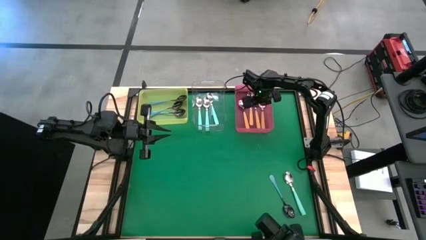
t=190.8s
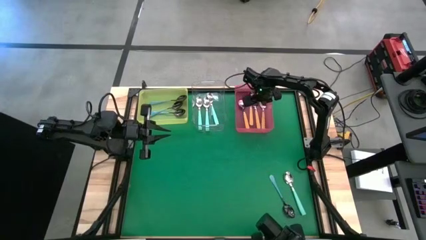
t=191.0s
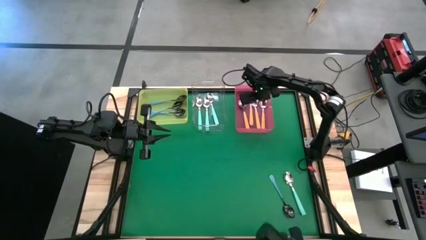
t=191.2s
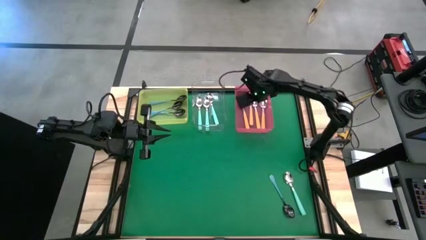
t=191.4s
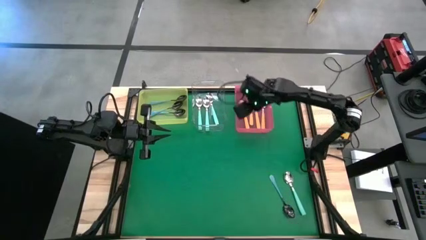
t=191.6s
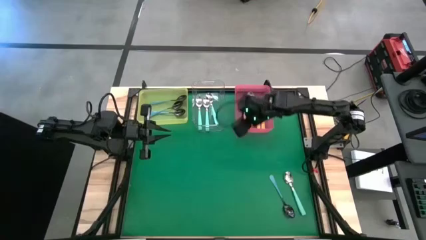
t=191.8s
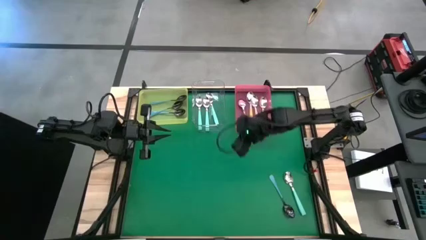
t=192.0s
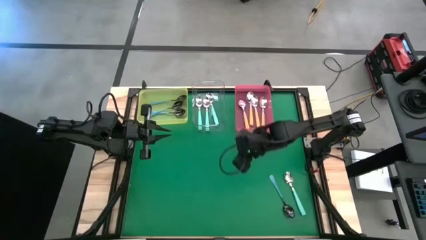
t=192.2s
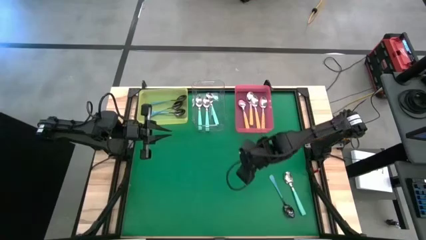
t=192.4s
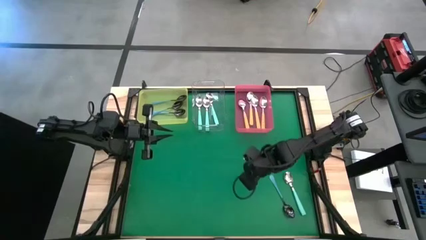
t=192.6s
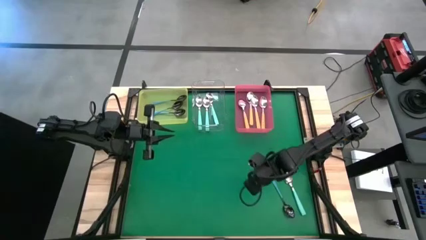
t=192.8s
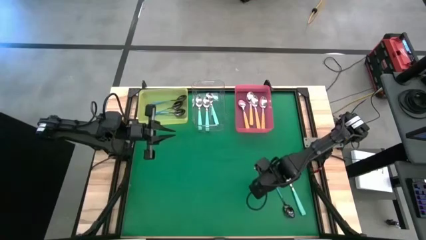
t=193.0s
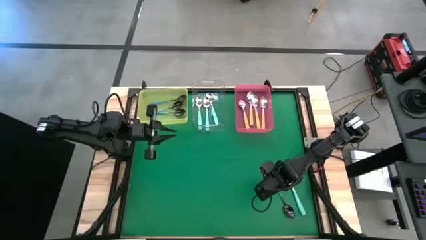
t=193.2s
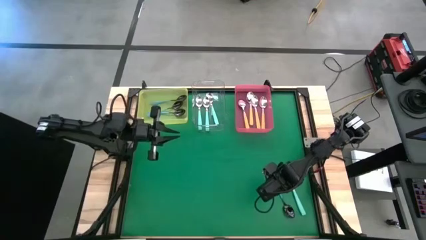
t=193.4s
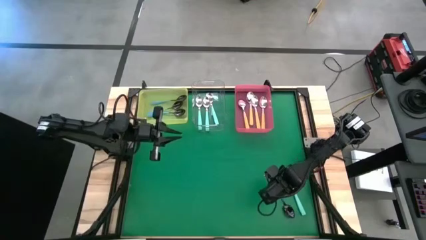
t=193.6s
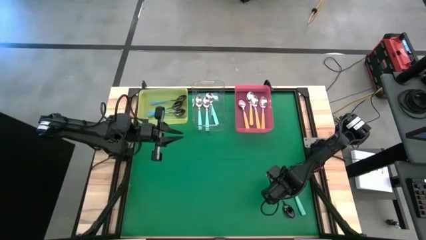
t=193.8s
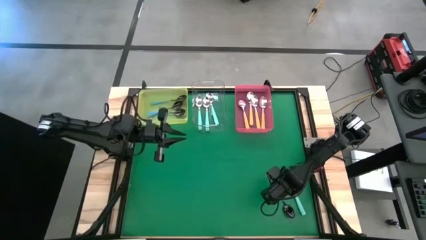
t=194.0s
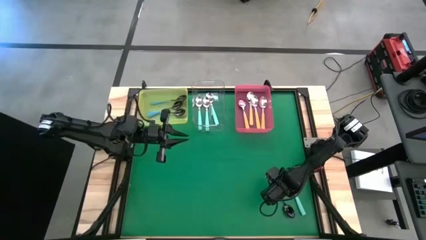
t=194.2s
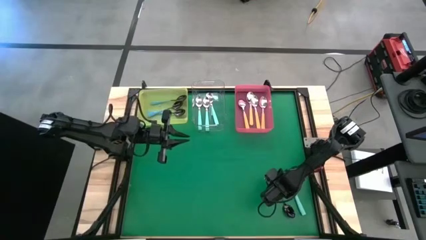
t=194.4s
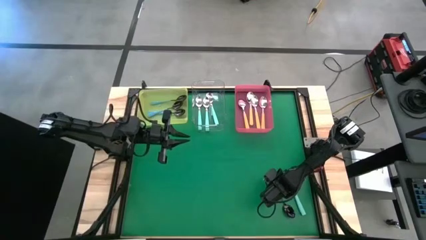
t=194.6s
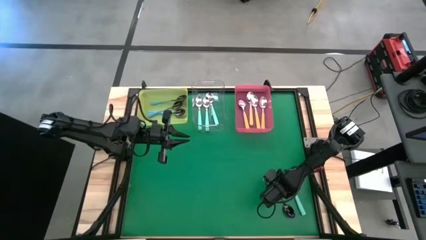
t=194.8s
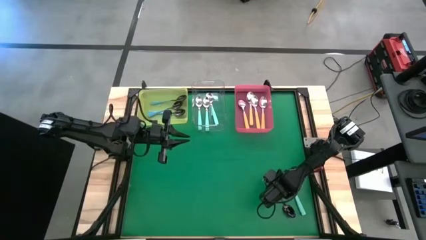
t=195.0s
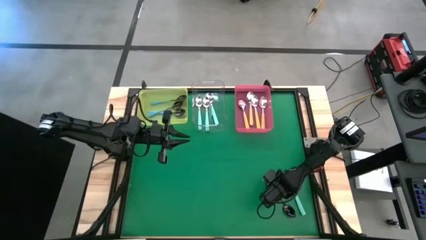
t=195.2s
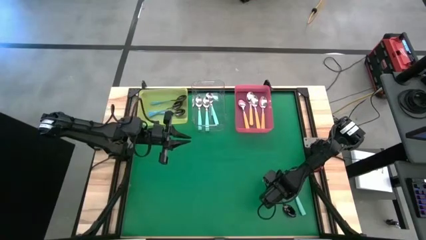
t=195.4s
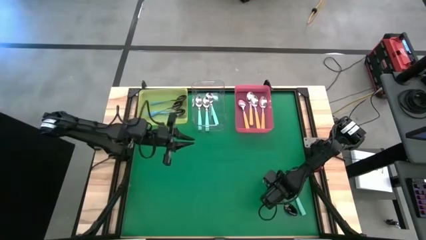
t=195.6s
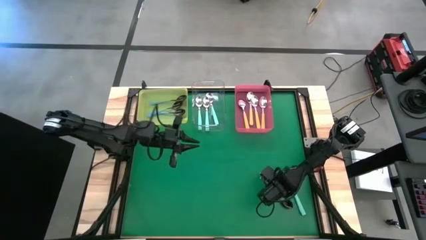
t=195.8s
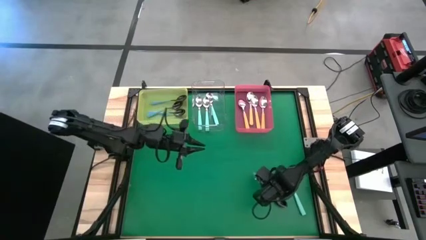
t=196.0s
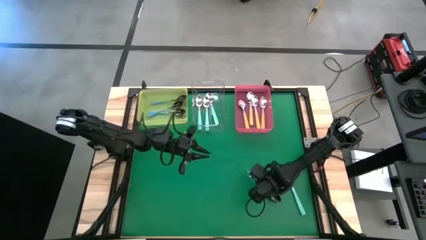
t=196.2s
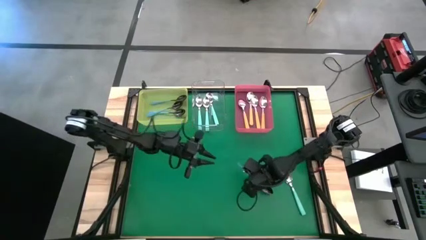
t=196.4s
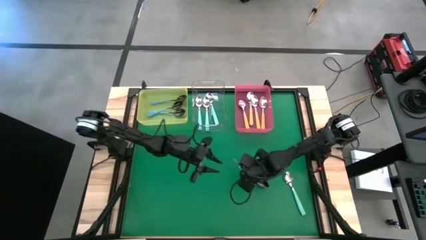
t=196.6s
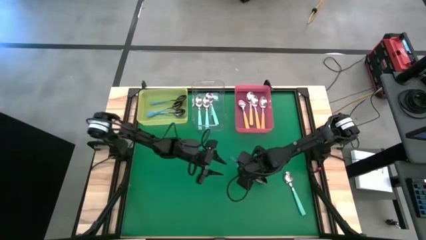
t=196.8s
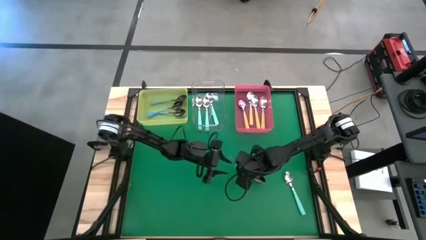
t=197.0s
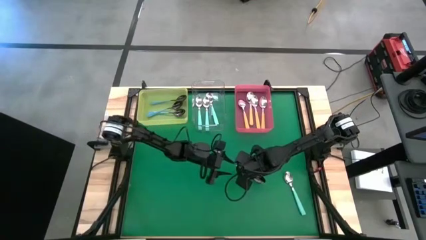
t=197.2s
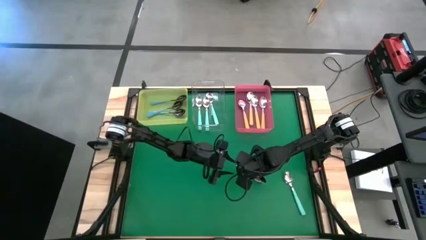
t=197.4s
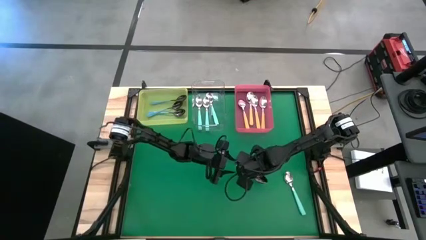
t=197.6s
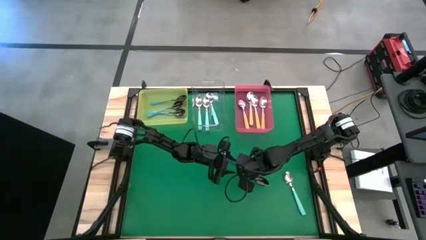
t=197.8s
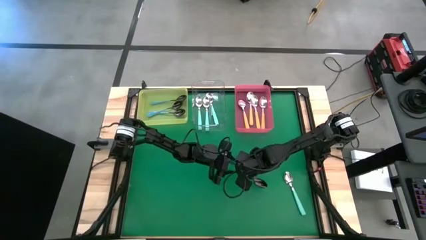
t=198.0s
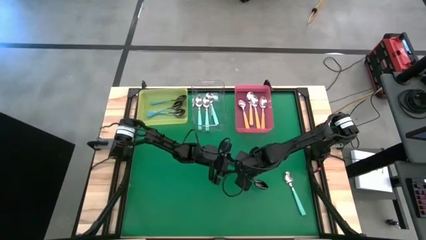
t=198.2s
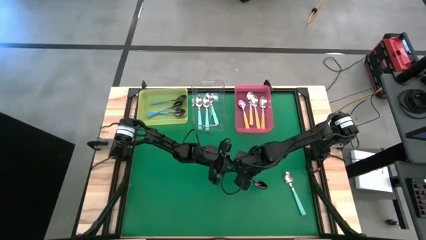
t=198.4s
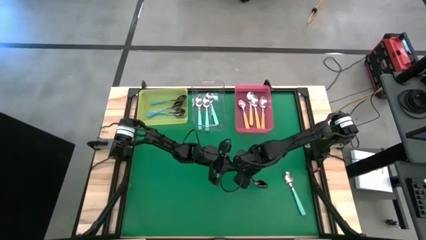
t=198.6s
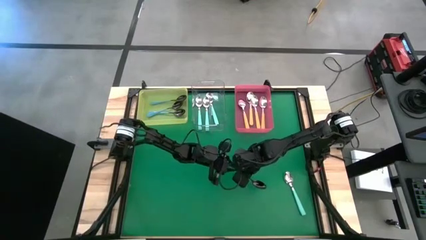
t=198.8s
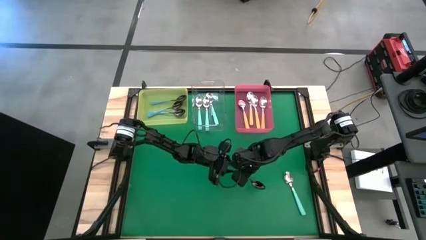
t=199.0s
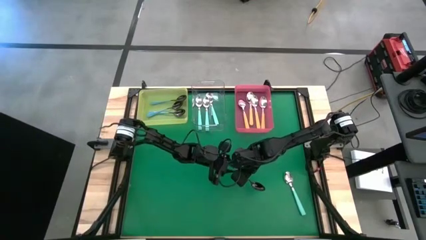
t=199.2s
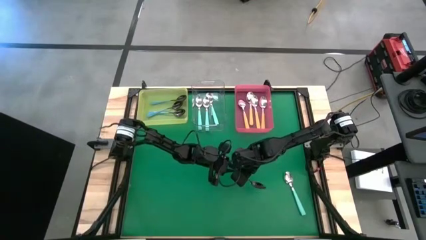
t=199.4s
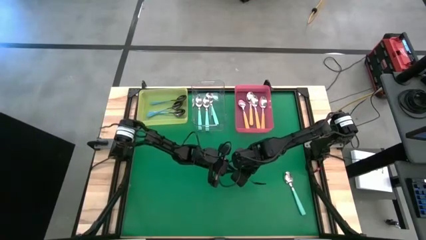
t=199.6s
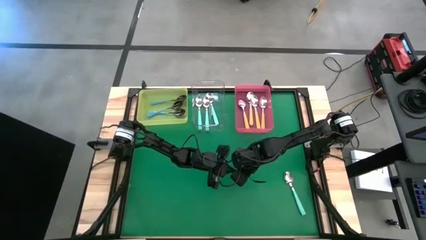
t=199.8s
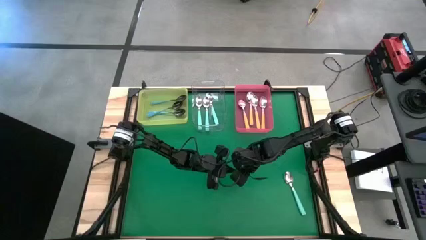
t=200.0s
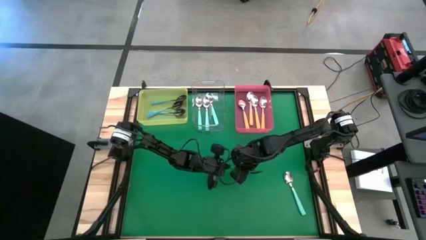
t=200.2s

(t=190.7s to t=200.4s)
Task: Sort silverware by color (type)
Put the blue spoon into the yellow bin

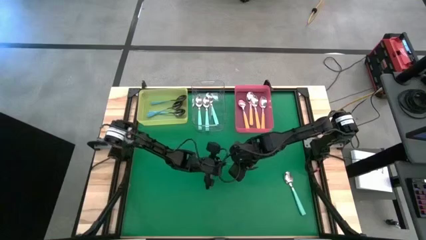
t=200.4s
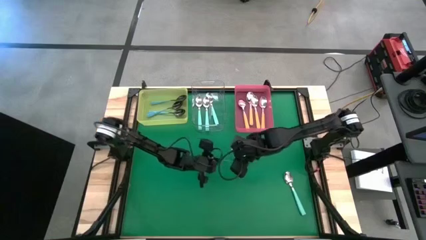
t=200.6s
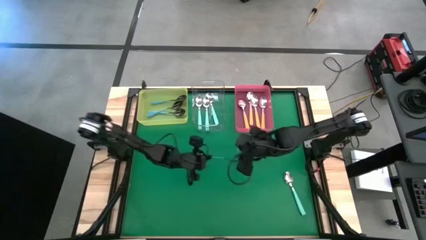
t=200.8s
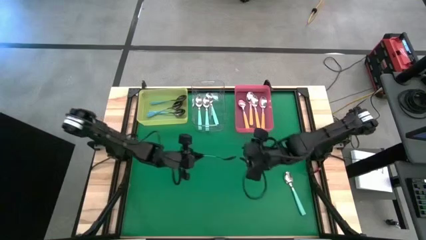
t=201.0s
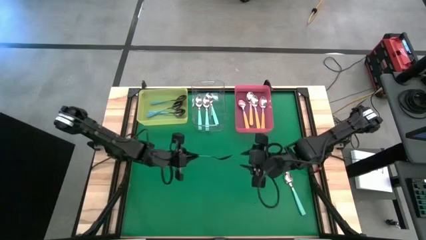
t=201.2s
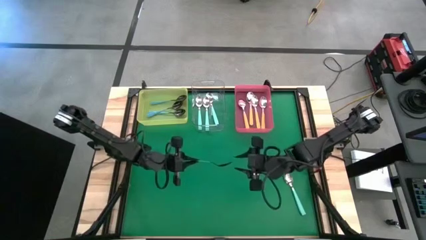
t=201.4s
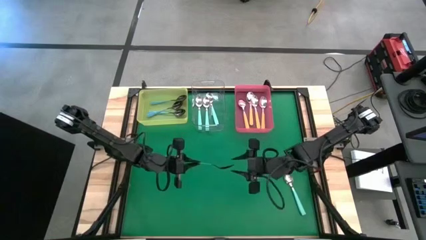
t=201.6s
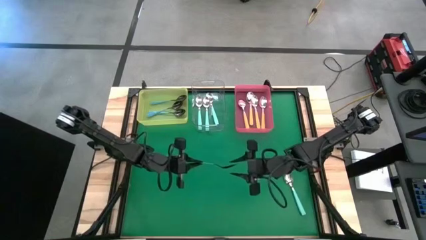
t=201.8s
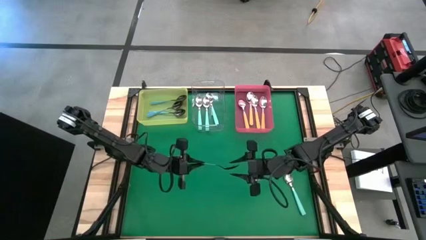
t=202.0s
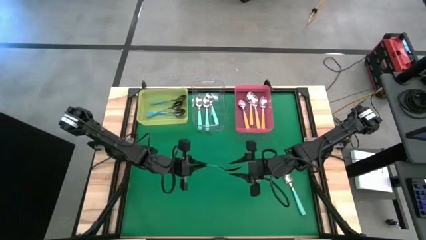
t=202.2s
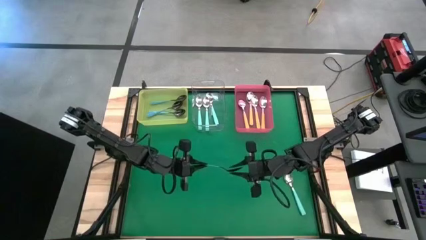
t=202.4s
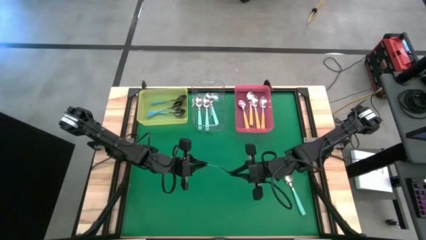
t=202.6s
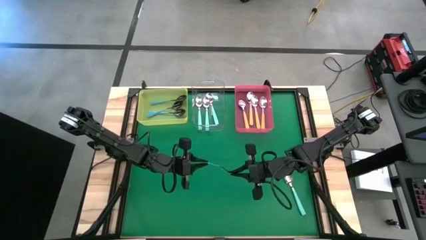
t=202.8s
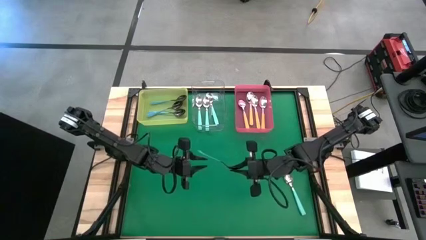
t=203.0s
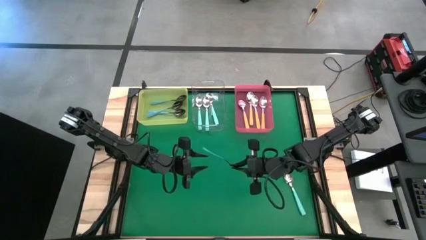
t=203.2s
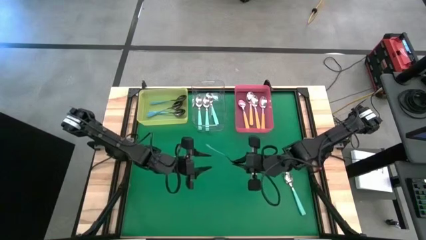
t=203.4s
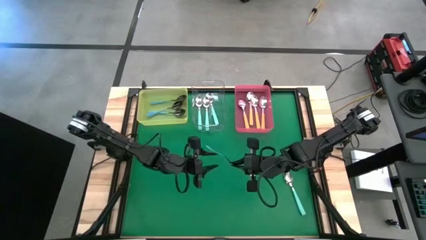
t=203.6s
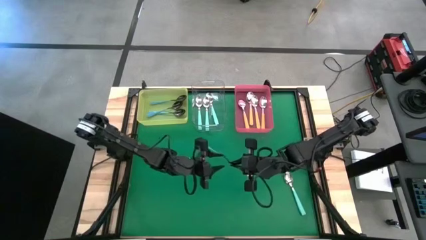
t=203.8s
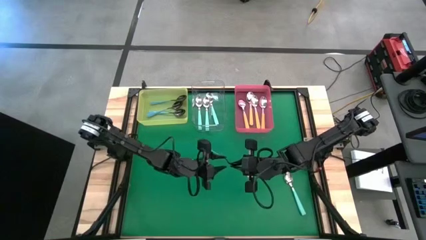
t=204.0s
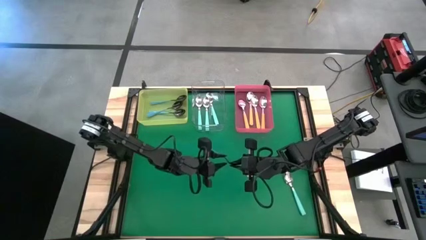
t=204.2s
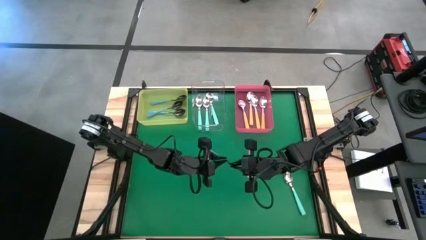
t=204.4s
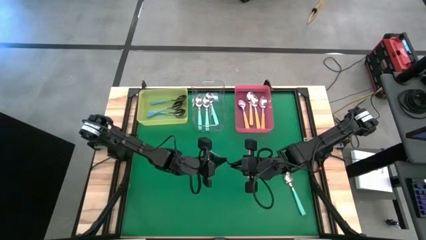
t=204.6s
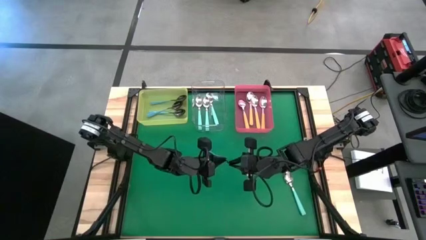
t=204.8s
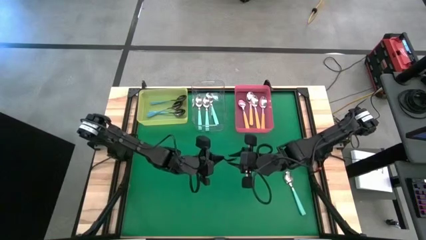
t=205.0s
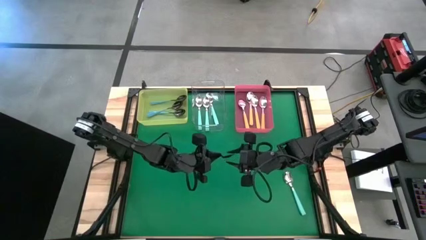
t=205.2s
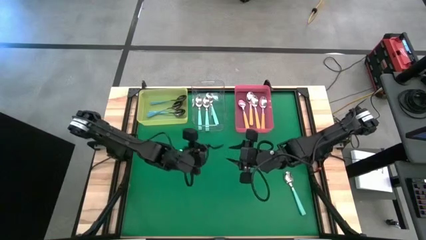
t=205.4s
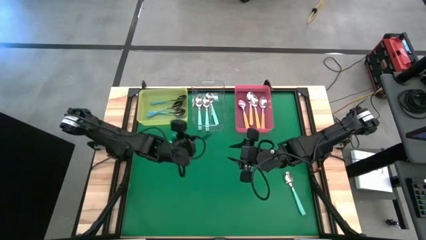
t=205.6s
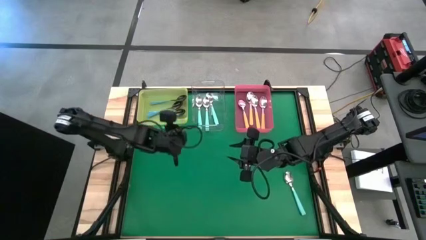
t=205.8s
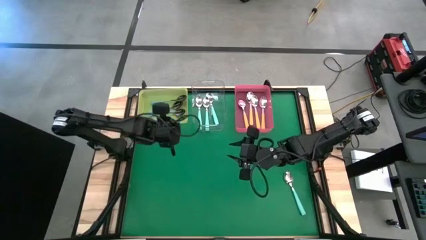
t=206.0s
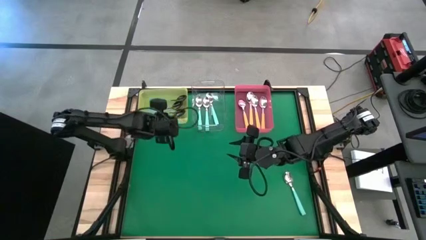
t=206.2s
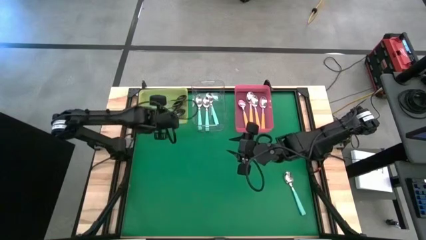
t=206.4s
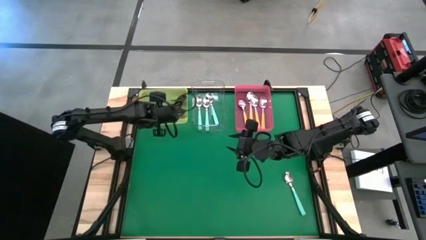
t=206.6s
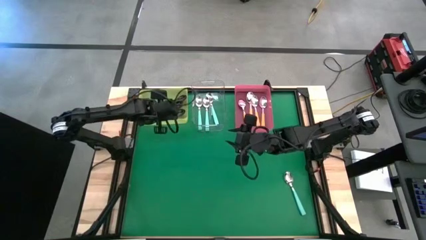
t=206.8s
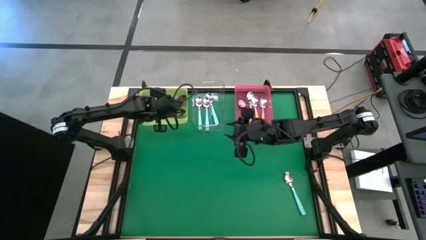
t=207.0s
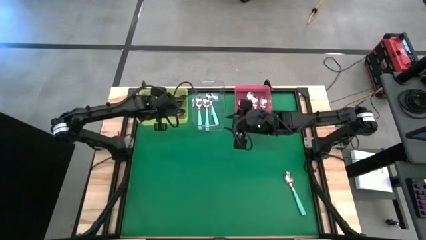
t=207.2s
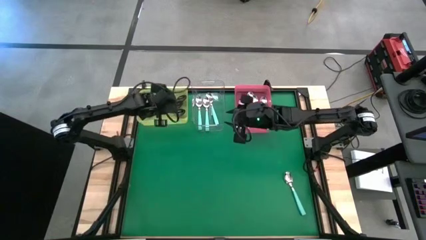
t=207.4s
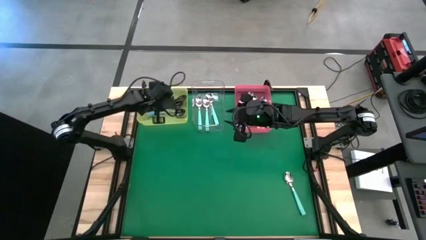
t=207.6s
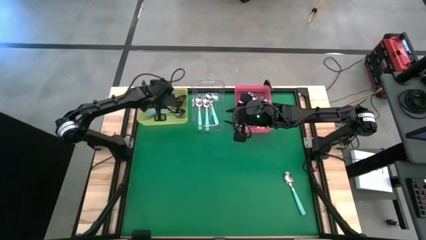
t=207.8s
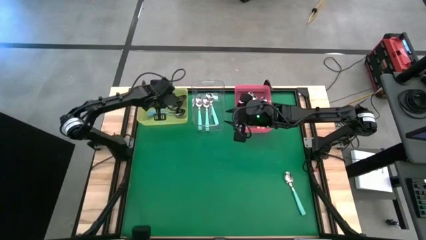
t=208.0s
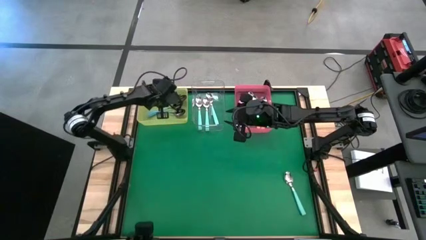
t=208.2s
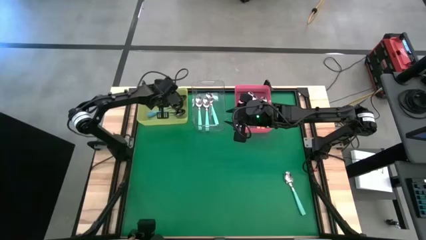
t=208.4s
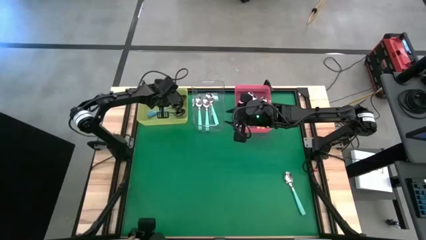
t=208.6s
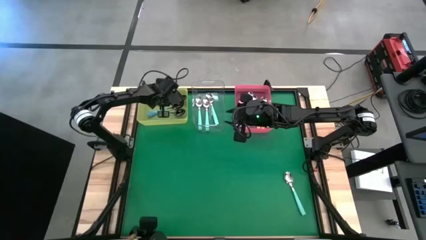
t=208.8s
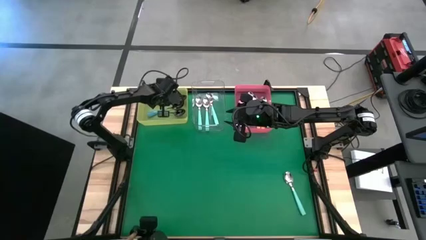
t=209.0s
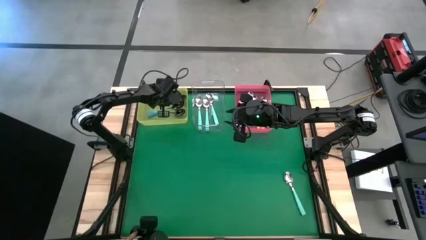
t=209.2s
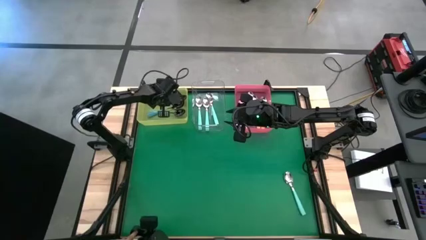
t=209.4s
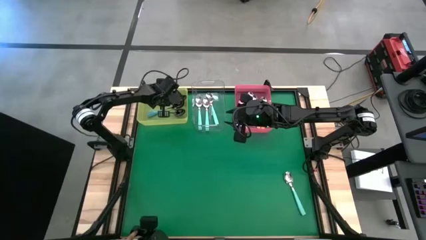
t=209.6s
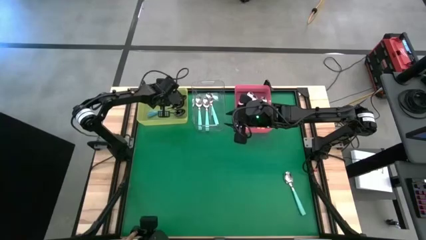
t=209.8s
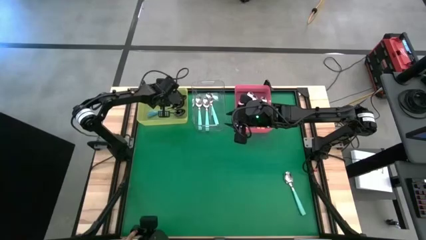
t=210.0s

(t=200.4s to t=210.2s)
Put the blue spoon into the yellow bin
